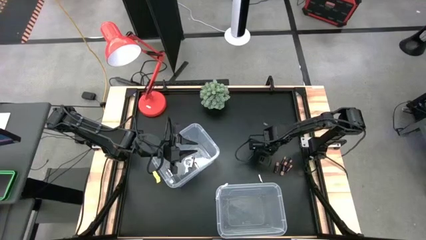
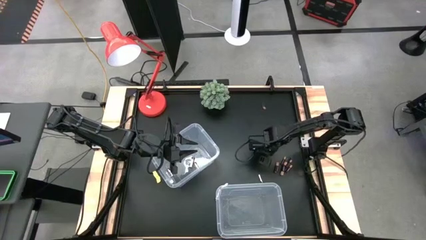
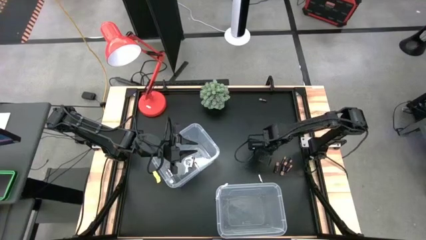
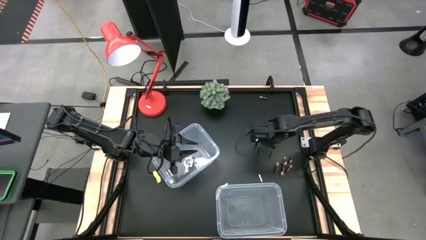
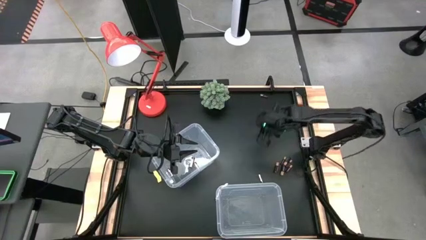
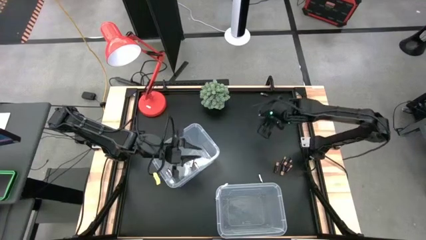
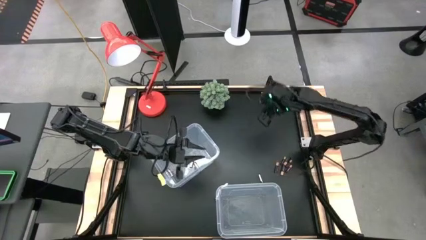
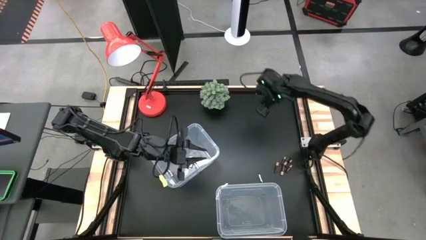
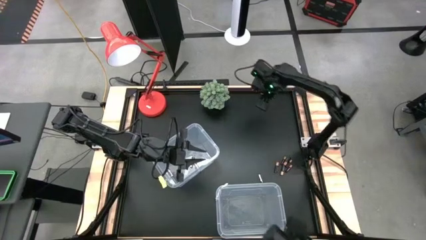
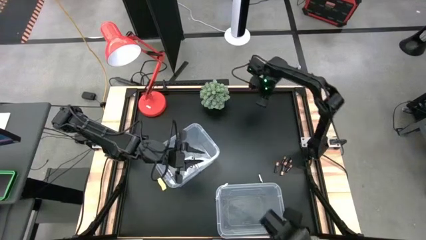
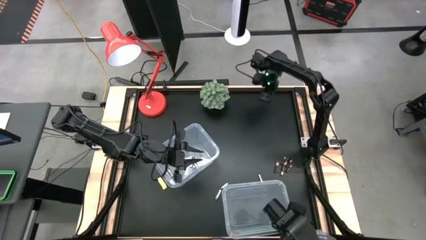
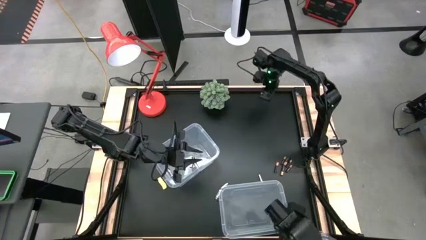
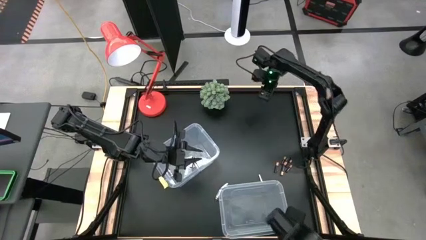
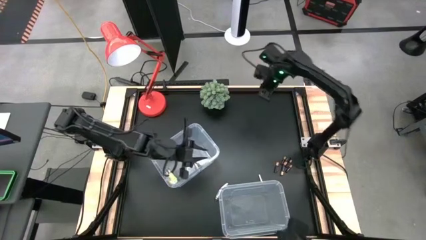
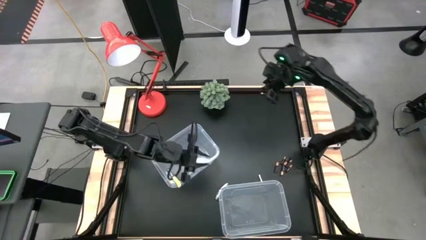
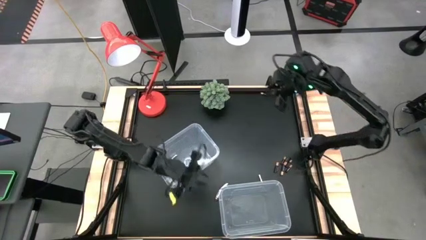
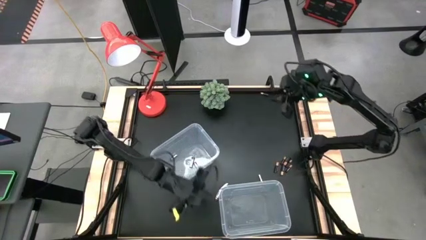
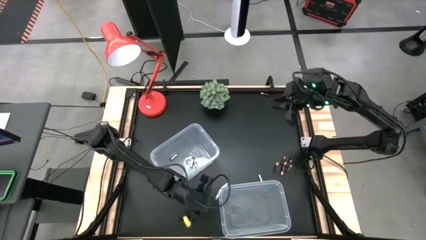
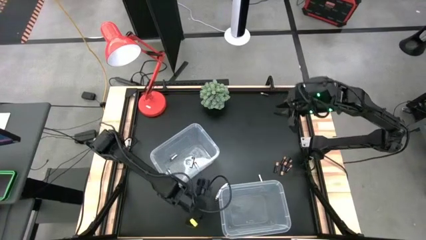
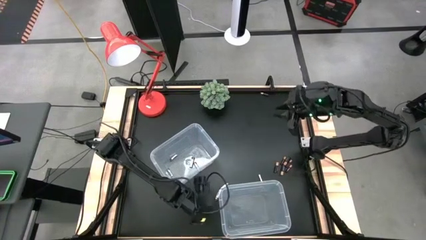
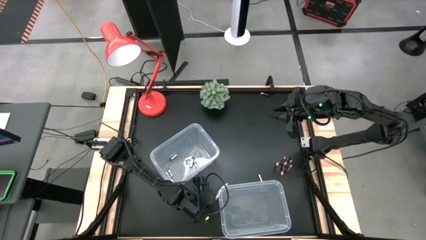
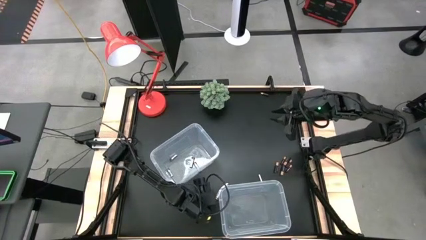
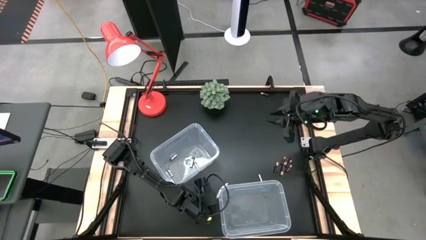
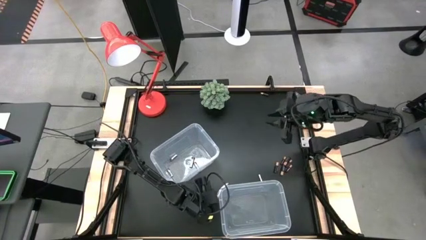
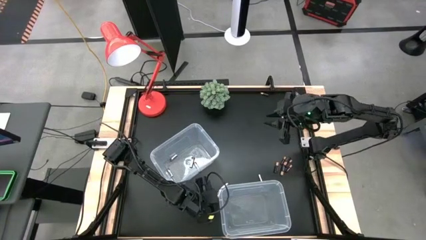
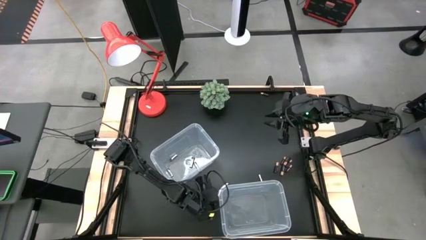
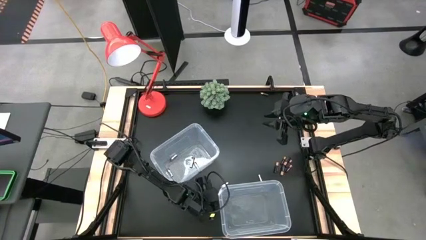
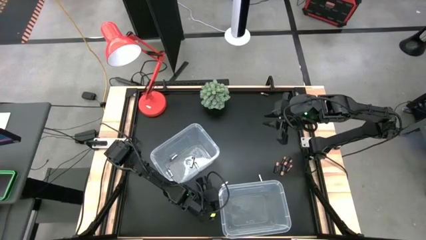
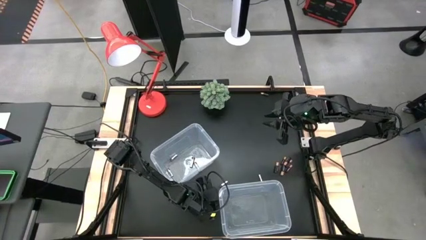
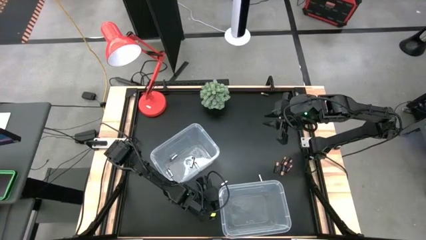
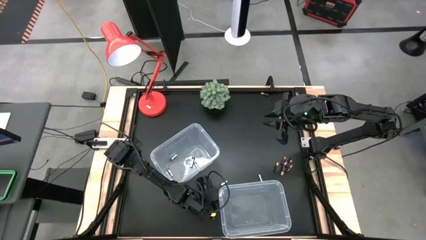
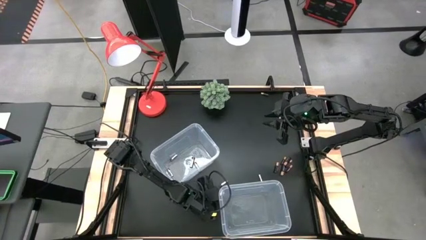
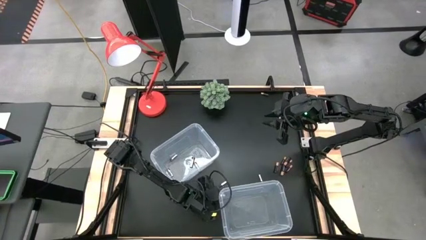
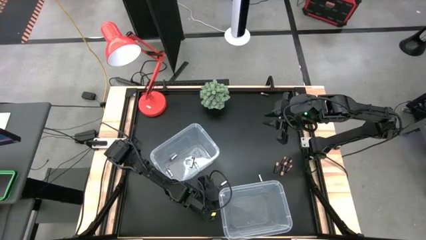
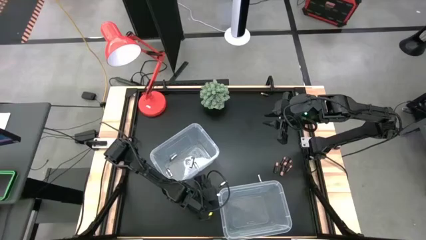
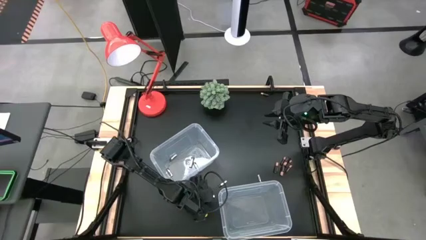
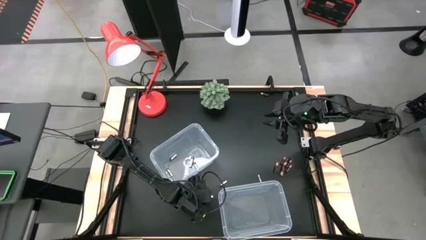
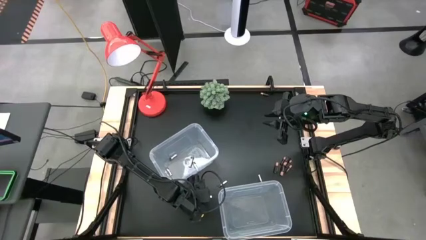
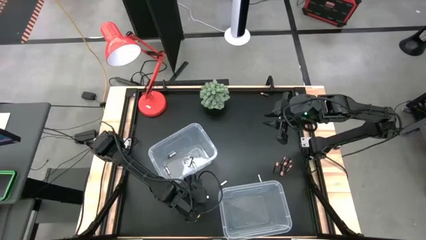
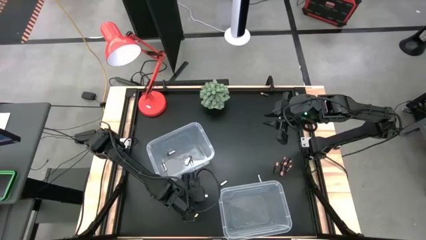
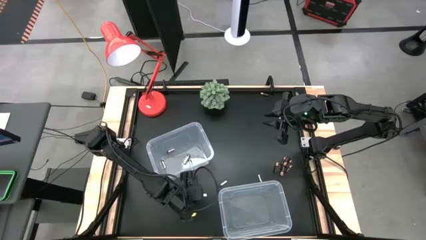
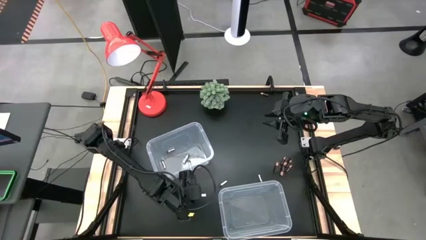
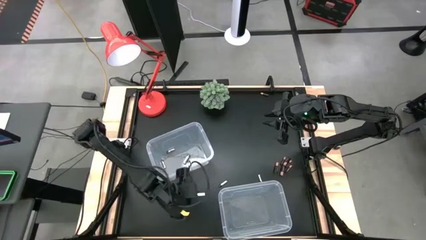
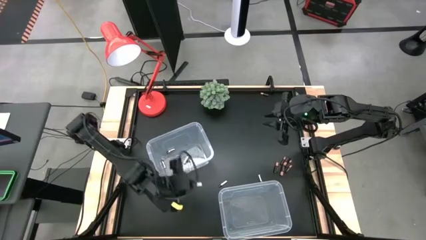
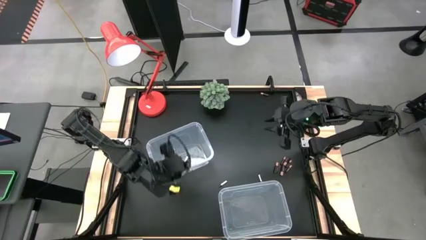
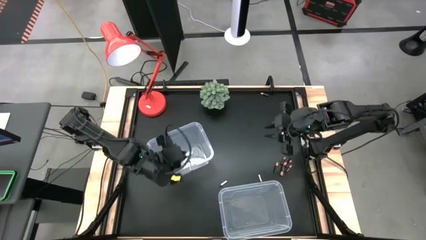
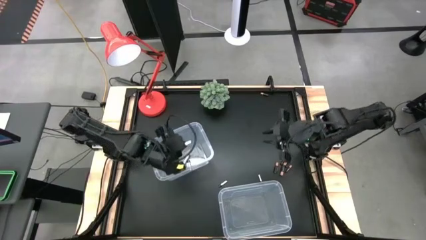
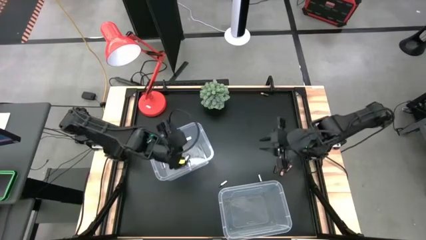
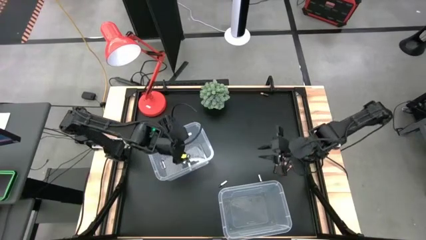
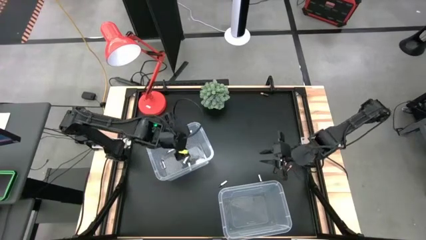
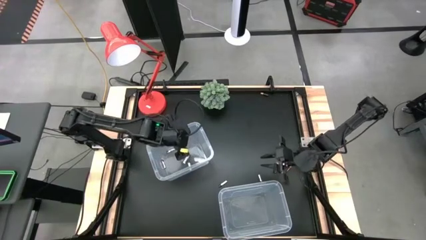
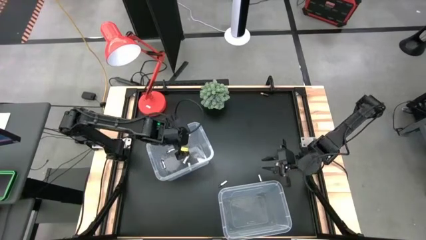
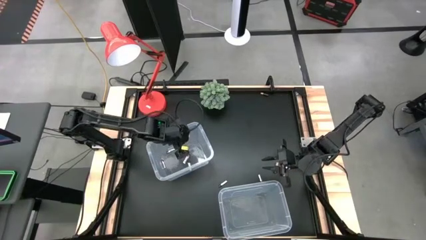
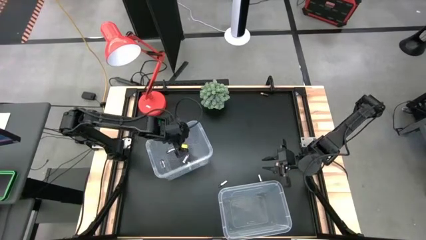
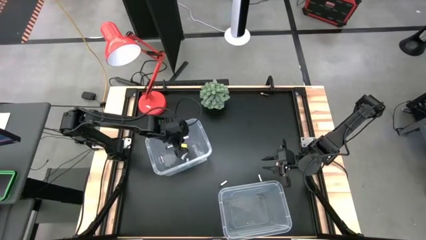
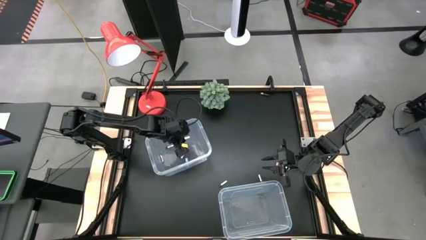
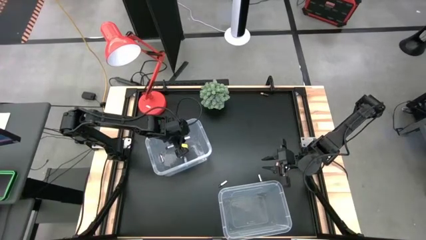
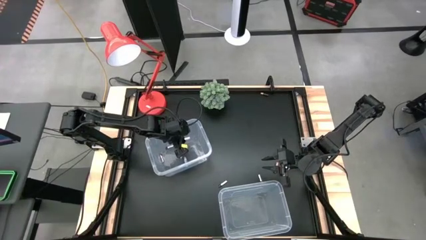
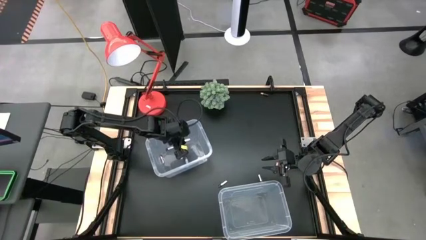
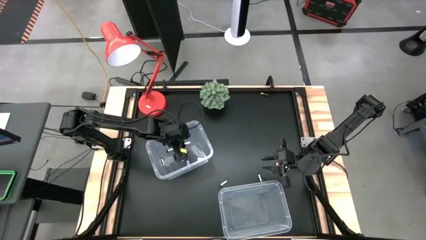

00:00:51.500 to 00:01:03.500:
Task: Sort batteries
Put the silver battery into the top transparent bin

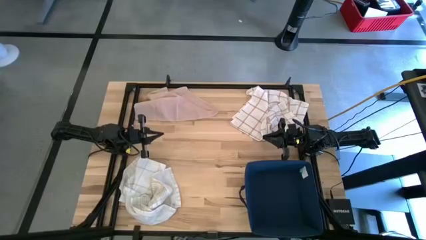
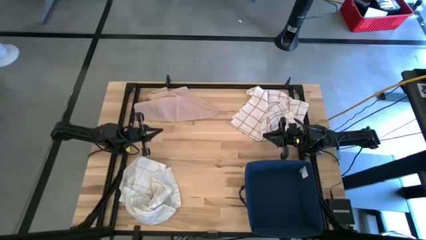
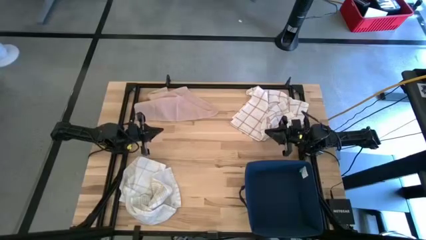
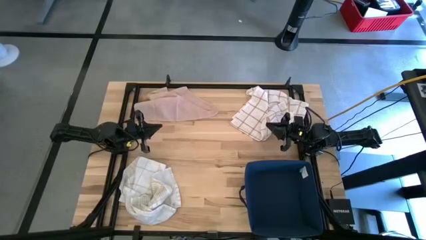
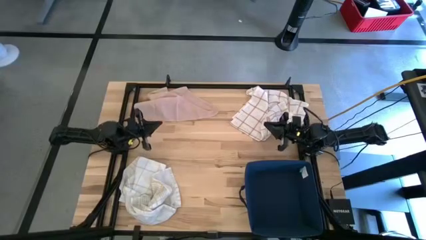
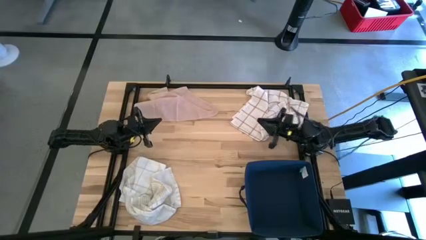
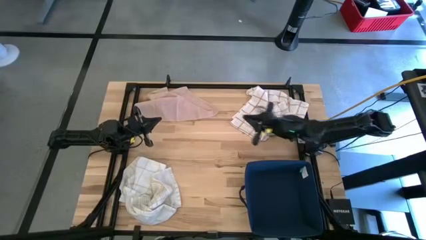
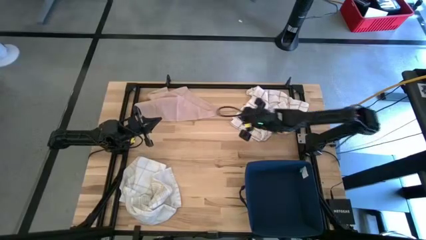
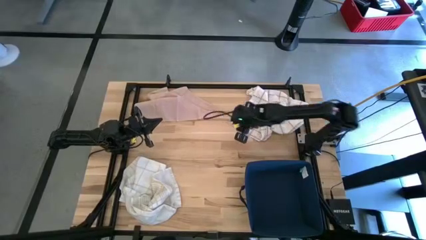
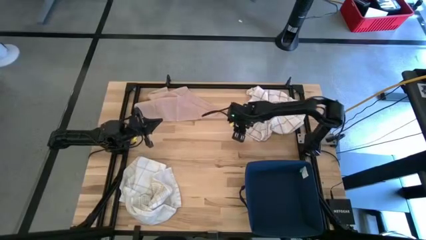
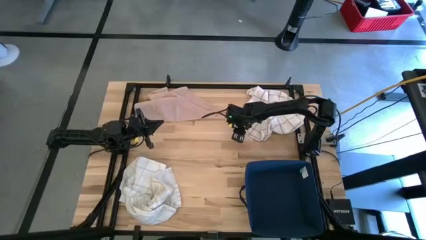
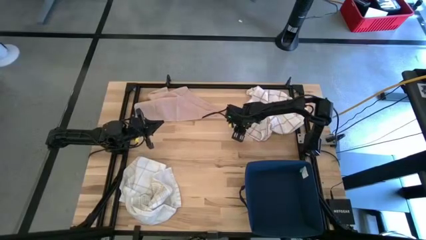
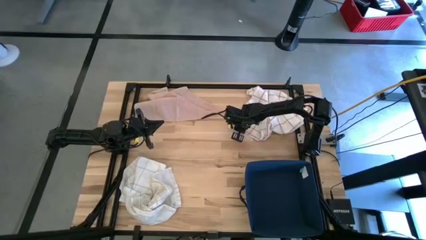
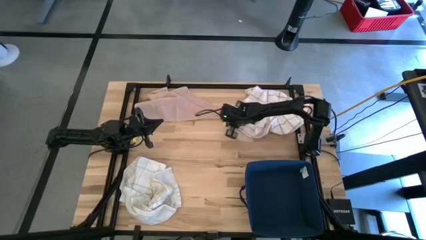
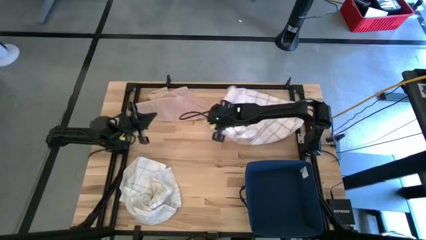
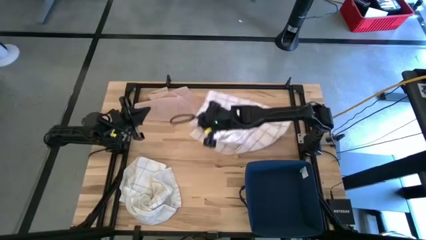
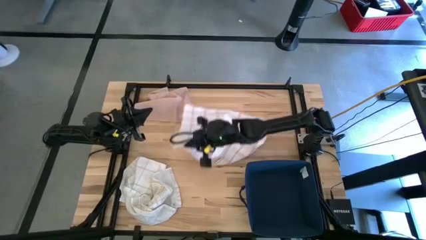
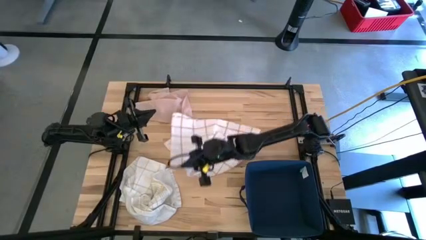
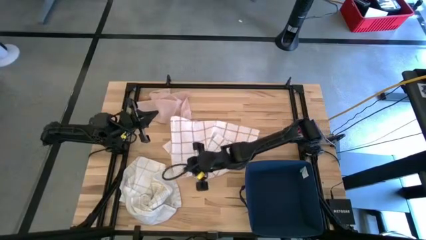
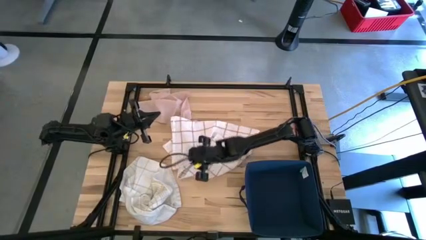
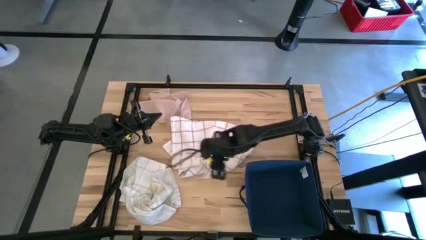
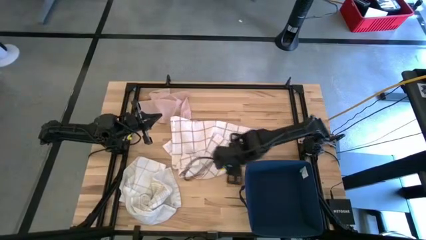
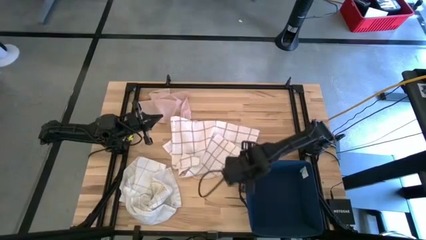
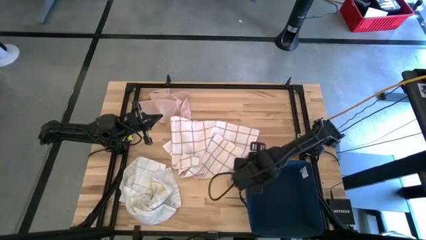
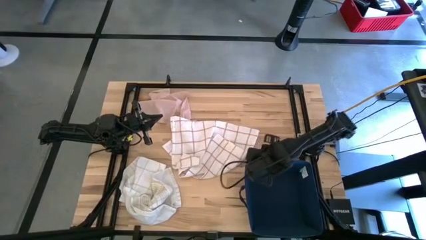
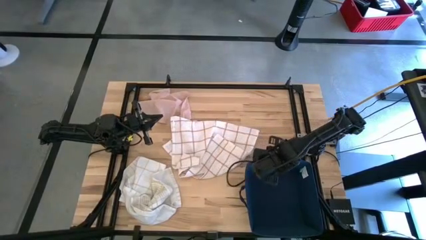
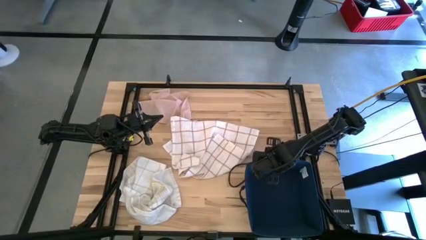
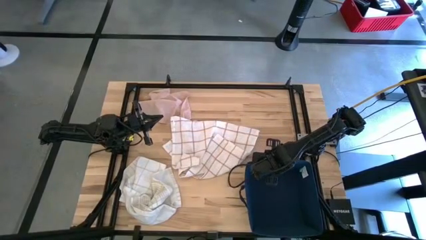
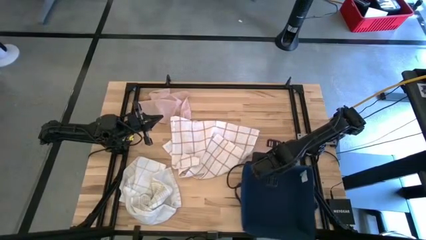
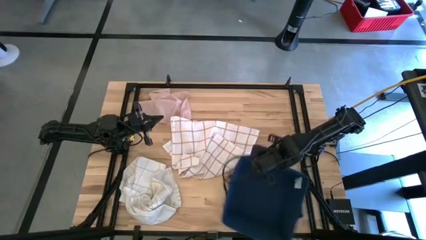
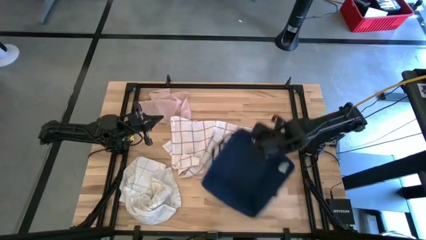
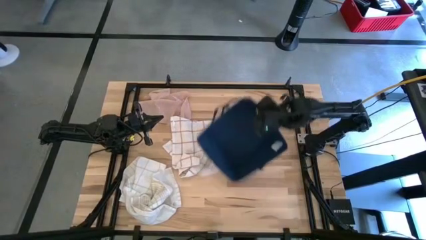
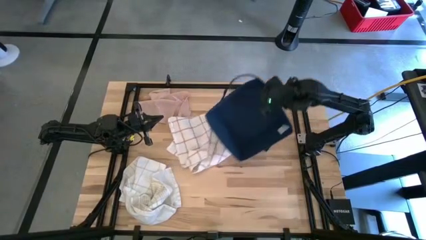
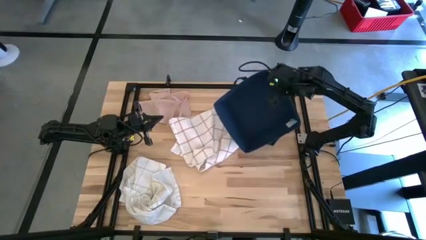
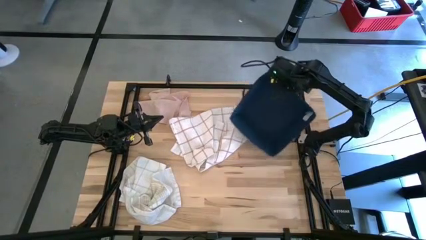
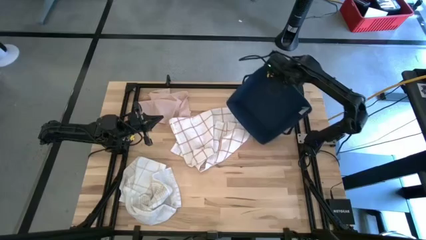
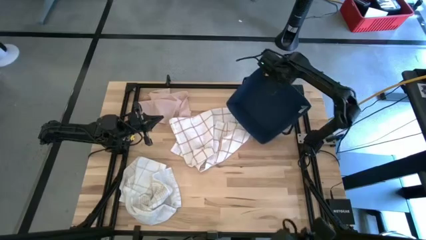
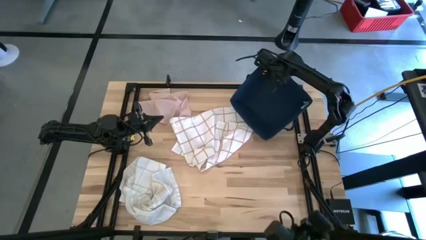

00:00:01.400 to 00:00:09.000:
Task: Fold towel
Move the blue laundry bin on the top right of the table
